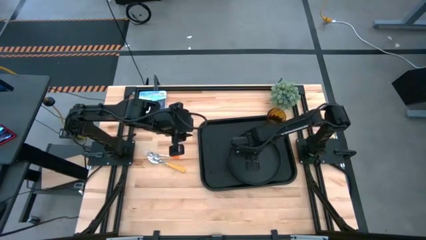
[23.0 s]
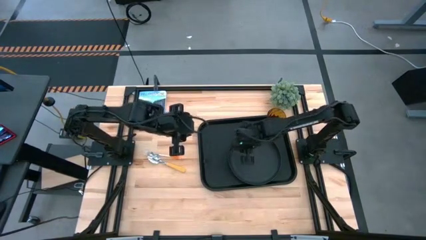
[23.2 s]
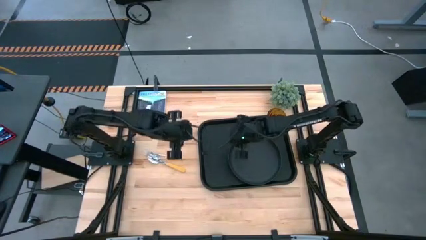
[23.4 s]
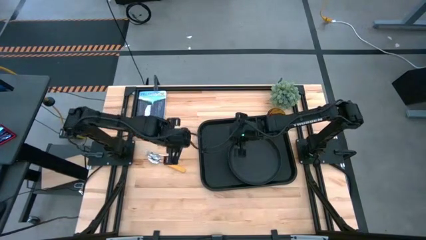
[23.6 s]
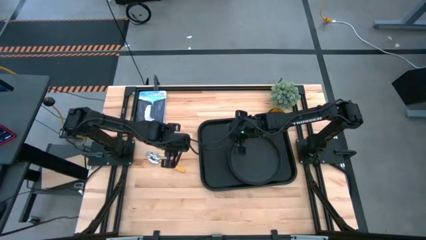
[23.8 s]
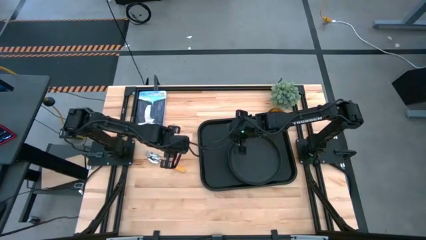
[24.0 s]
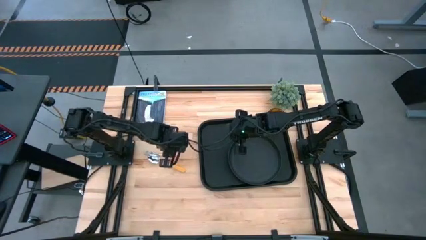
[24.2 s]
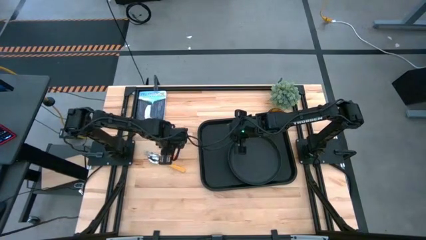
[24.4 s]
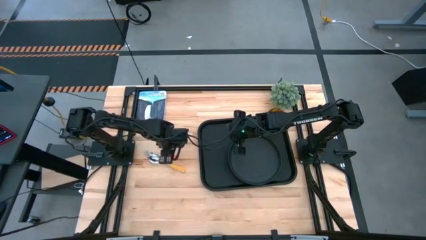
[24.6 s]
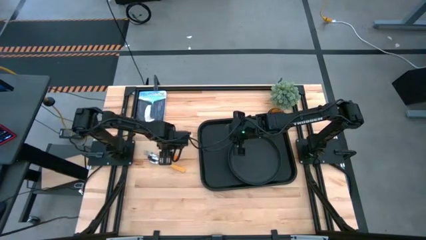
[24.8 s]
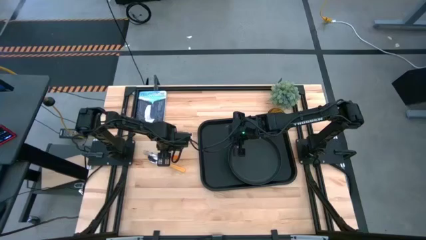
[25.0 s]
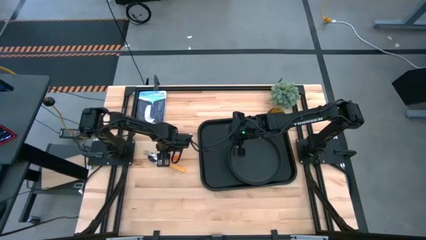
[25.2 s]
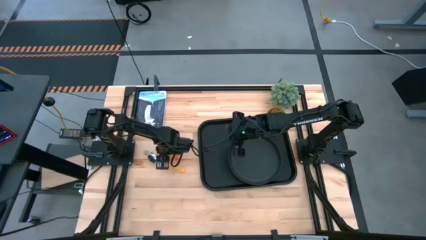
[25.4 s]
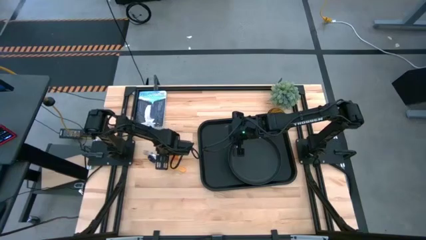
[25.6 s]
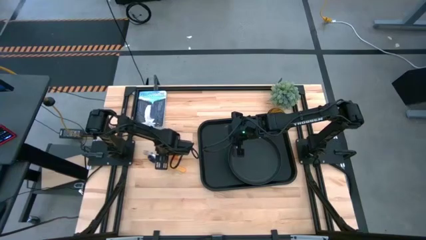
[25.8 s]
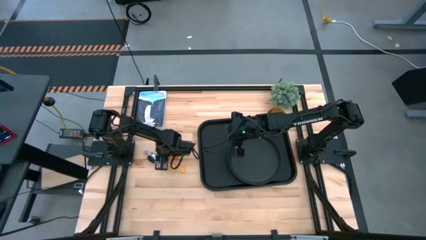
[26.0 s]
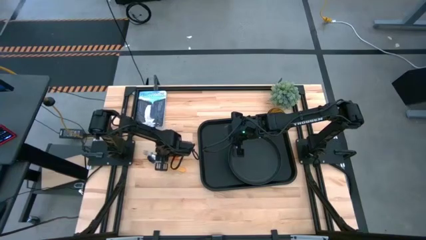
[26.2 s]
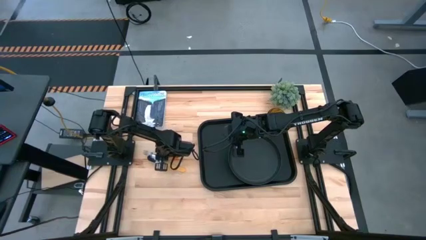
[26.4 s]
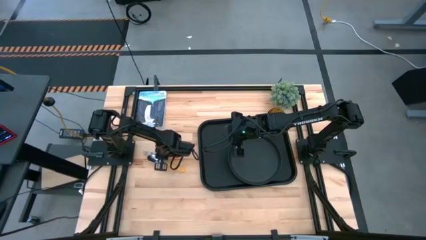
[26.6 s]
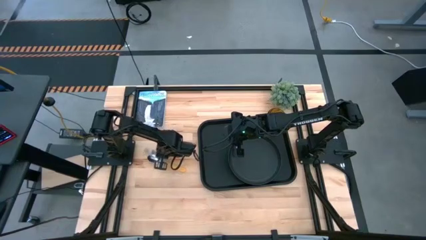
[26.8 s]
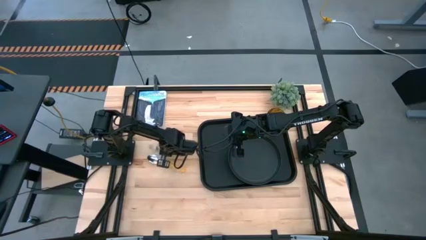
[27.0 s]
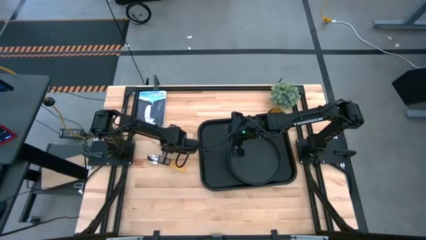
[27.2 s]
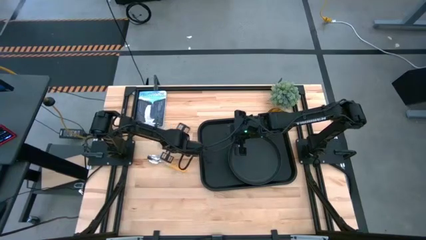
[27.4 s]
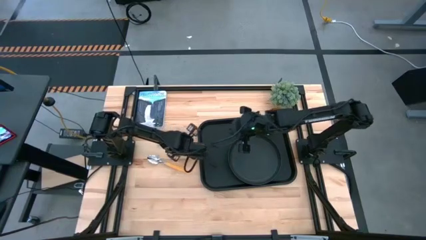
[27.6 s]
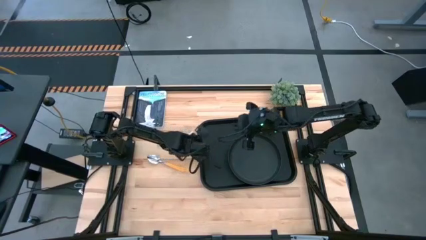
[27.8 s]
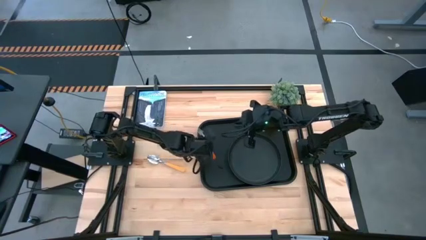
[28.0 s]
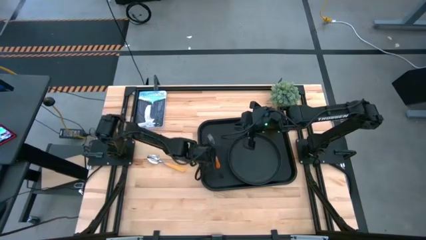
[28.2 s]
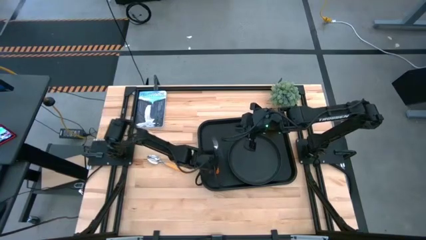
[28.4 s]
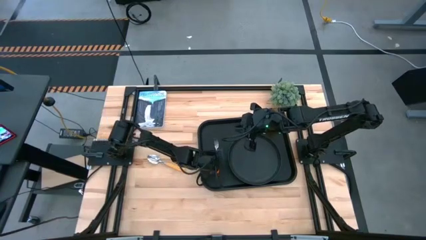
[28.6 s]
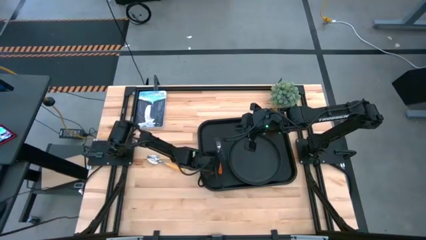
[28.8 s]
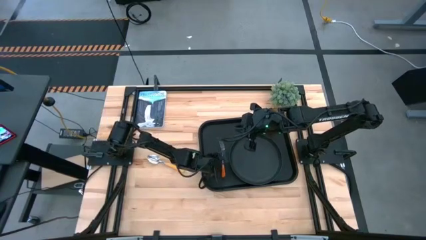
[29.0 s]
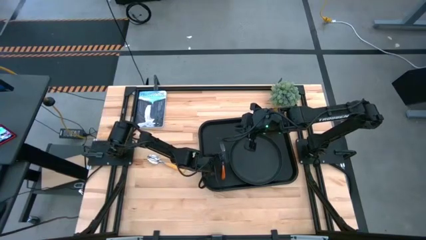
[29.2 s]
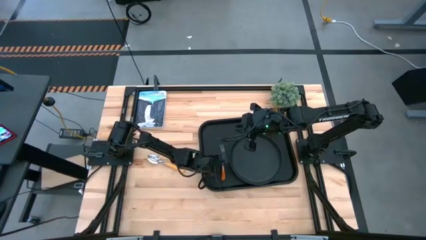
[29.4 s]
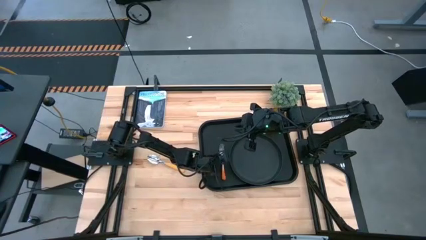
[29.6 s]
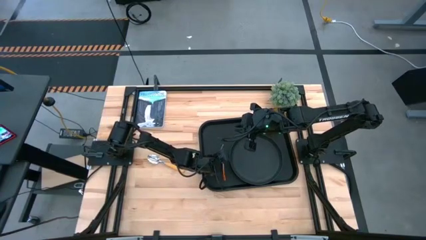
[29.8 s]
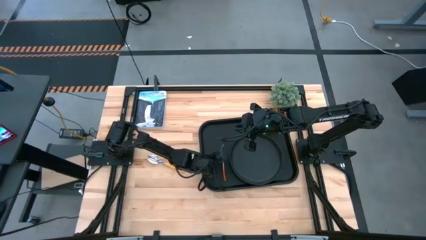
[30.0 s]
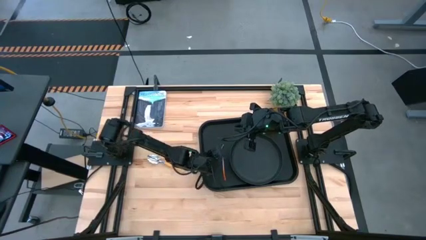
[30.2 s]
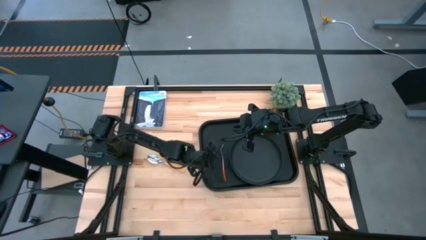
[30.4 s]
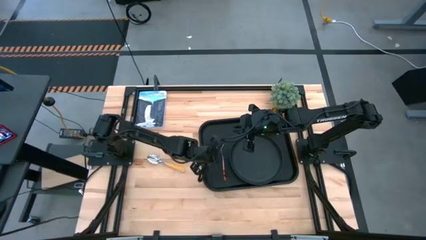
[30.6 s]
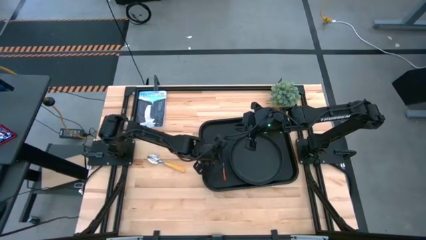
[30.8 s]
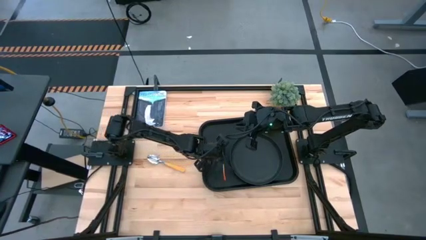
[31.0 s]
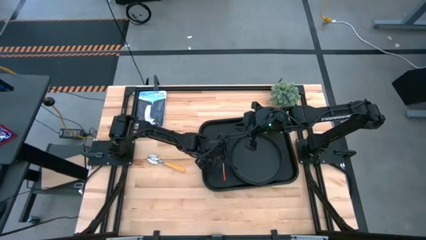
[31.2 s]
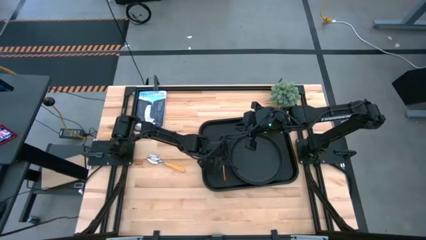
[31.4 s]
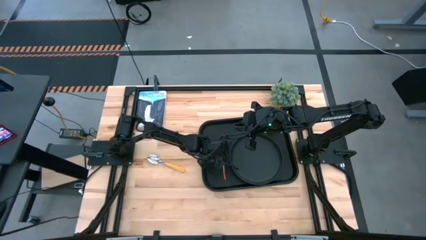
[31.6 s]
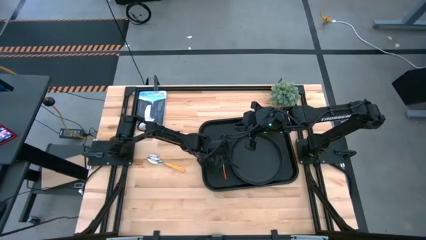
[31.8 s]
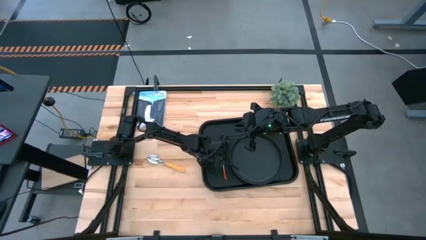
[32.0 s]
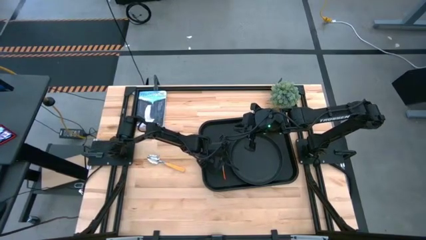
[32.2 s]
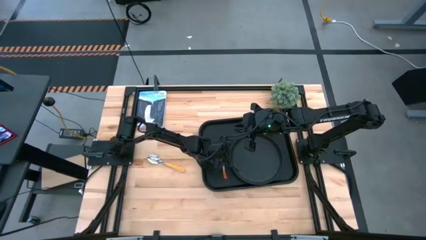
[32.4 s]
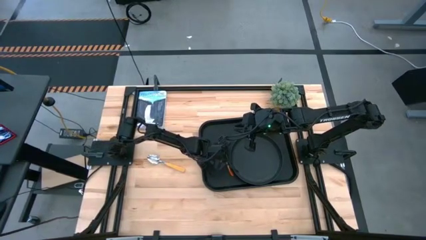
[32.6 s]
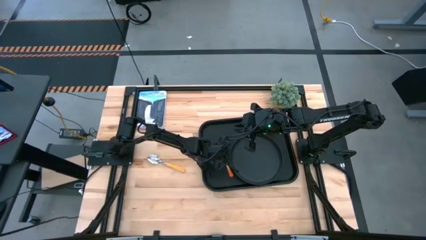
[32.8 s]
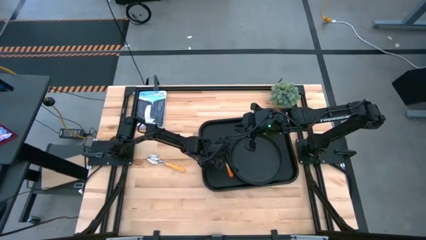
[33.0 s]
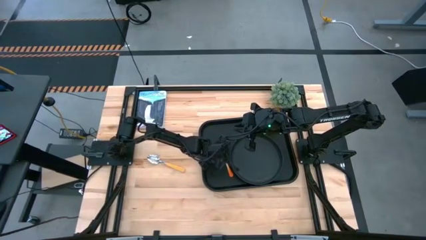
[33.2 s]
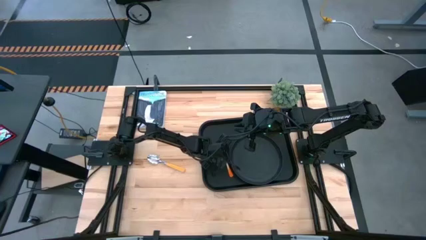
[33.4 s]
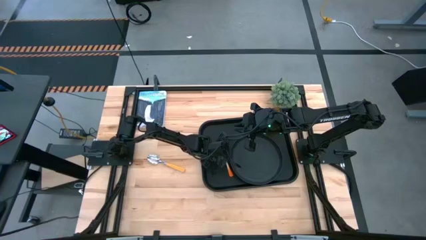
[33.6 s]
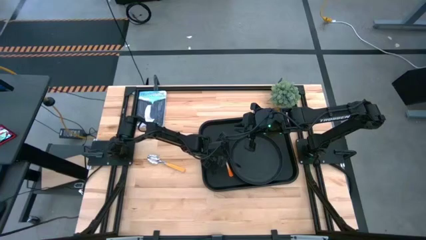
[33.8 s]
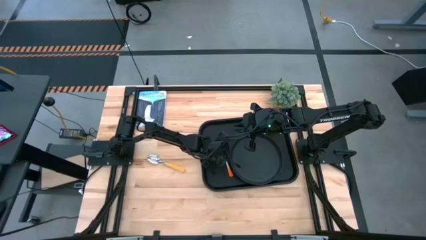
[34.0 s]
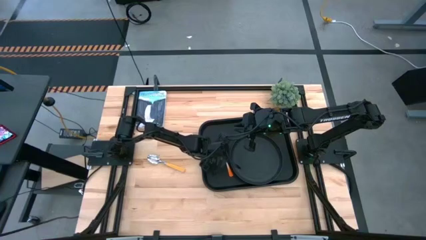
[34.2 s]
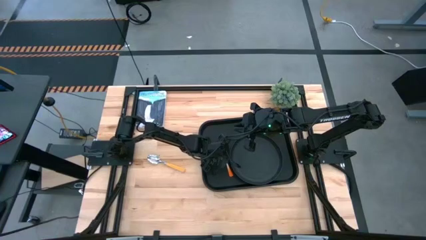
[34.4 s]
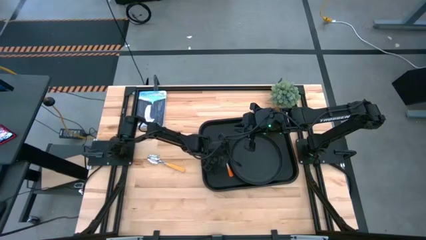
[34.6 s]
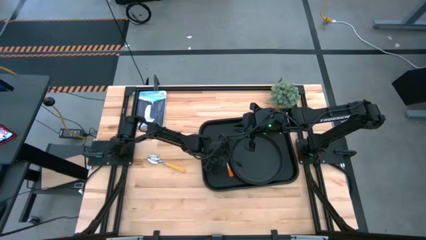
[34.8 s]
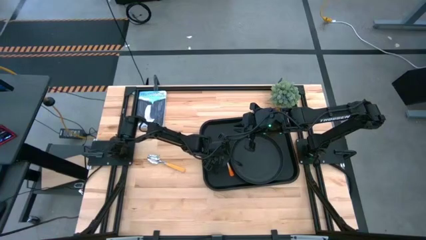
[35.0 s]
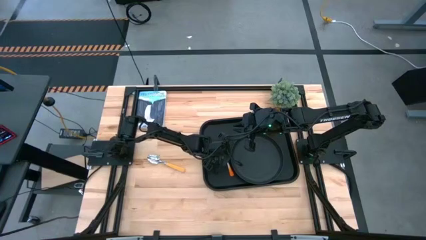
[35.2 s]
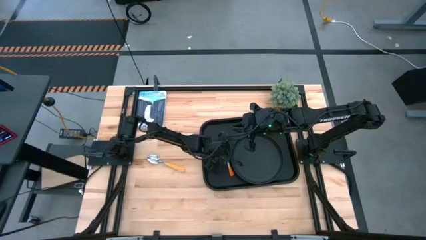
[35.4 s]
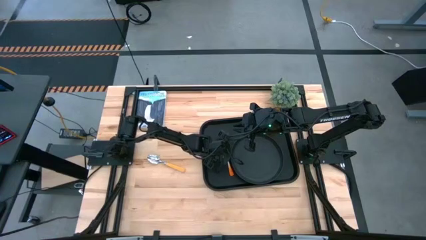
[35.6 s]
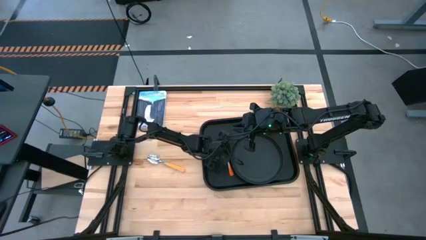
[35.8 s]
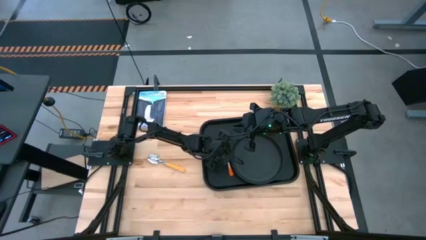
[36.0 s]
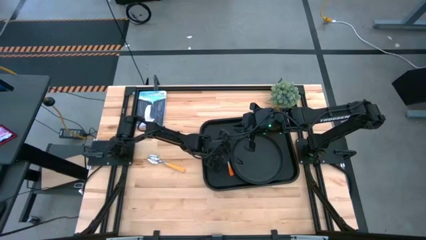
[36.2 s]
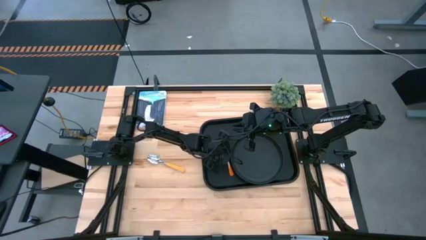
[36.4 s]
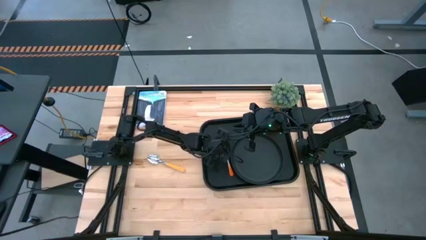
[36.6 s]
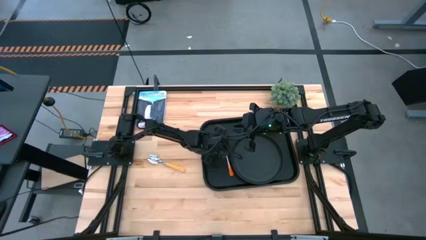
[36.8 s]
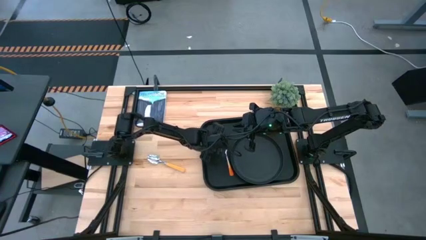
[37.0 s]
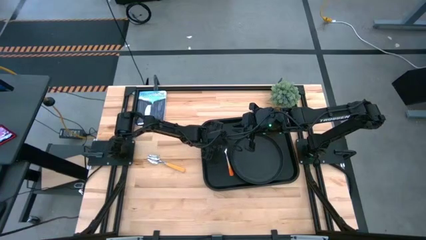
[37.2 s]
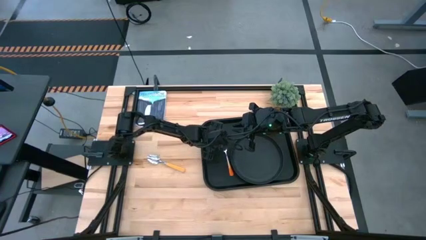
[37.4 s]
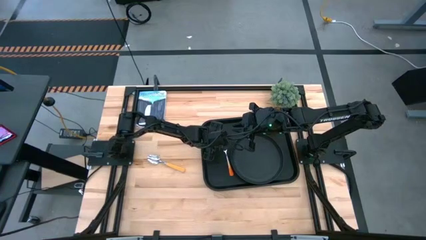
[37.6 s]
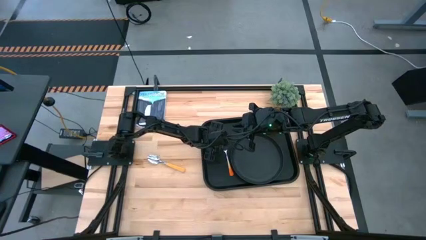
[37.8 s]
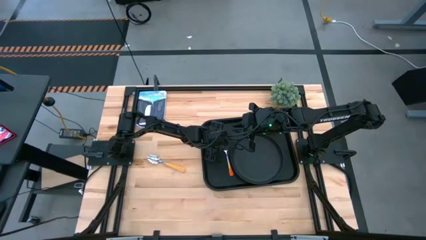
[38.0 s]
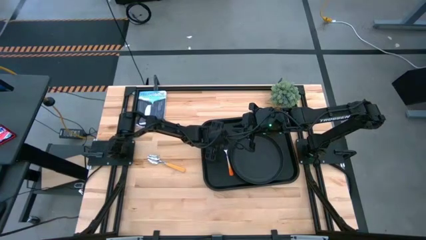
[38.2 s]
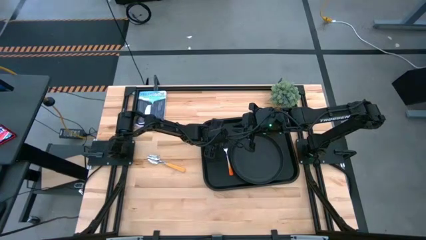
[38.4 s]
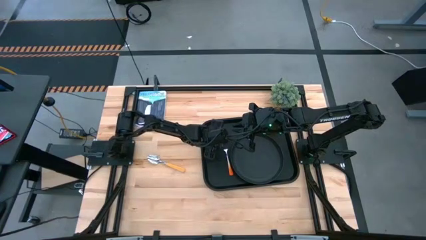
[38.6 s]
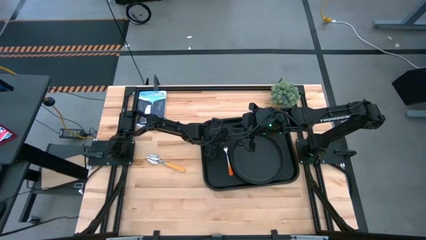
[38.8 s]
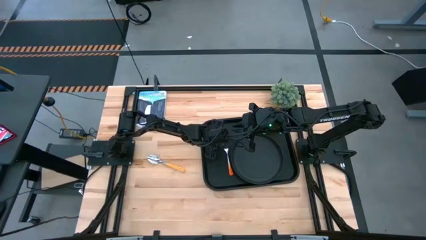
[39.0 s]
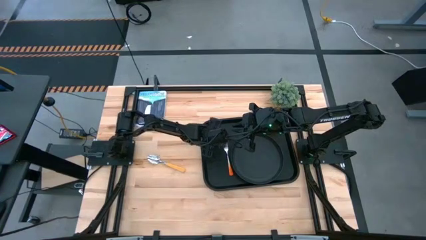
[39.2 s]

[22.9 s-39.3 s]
Task: Pick and place plate/cup/fork/spoon on tray
Put the orange fork on the black tray to the left of the black plate
